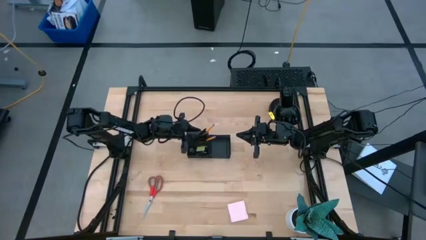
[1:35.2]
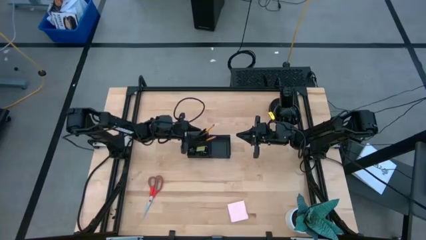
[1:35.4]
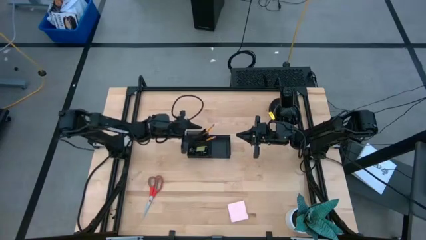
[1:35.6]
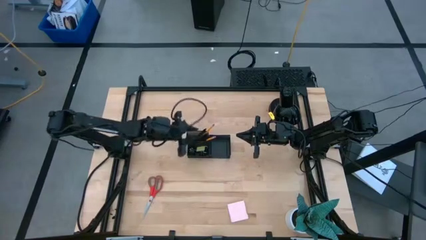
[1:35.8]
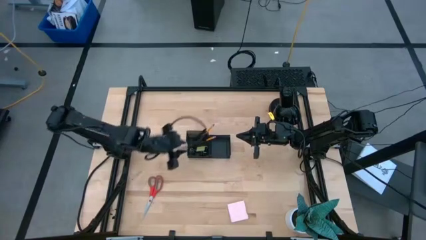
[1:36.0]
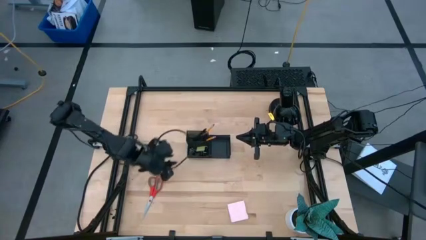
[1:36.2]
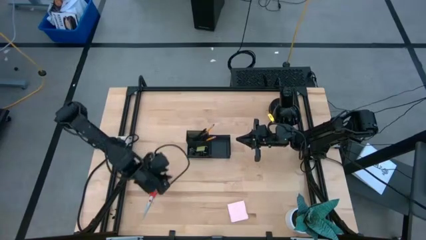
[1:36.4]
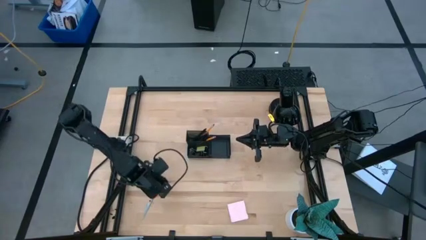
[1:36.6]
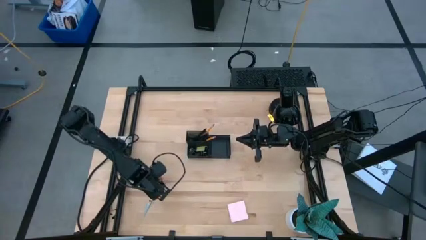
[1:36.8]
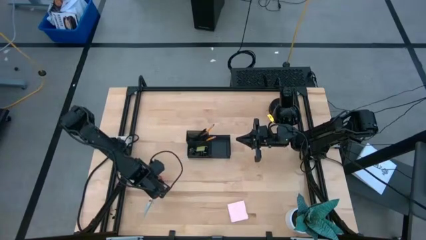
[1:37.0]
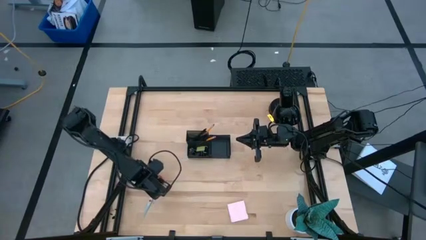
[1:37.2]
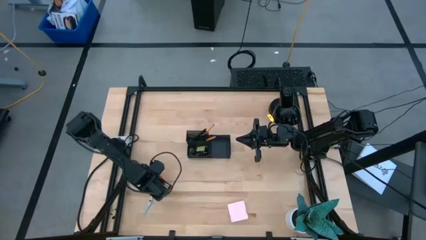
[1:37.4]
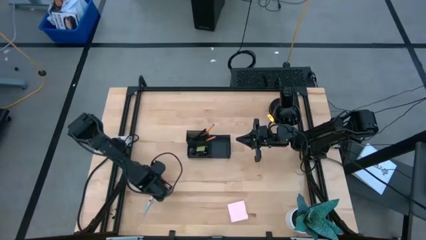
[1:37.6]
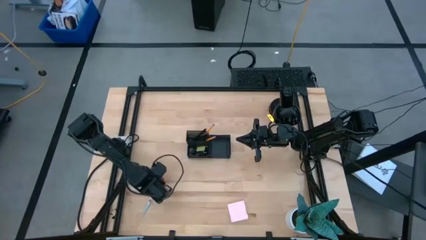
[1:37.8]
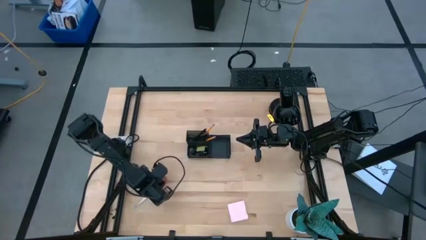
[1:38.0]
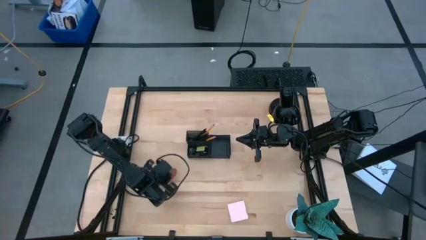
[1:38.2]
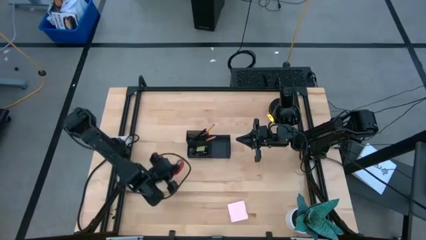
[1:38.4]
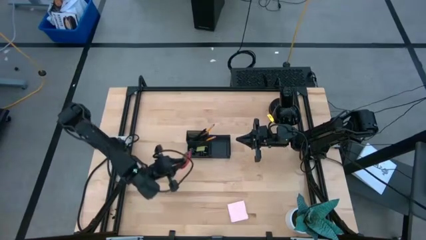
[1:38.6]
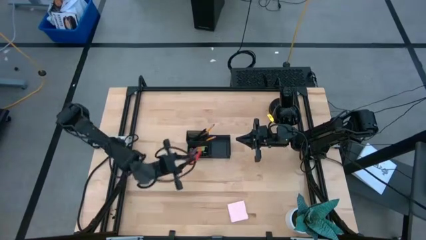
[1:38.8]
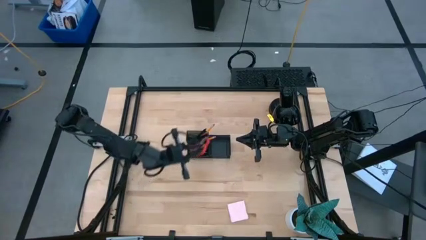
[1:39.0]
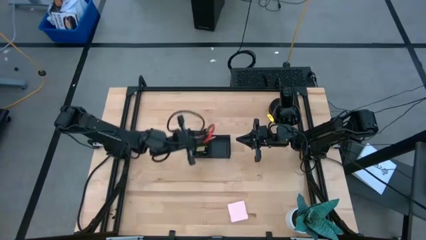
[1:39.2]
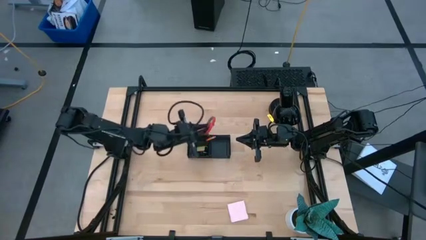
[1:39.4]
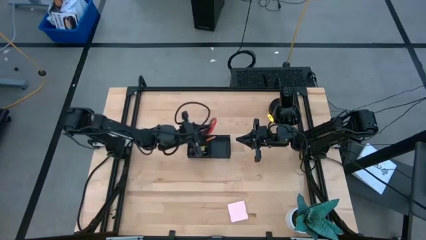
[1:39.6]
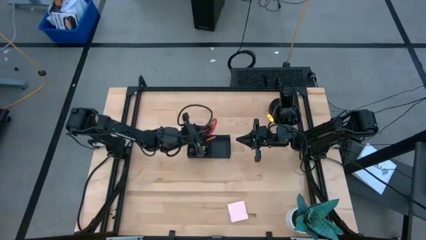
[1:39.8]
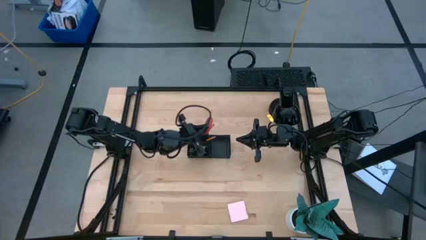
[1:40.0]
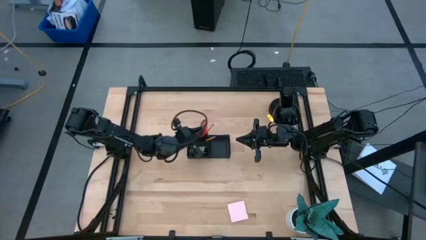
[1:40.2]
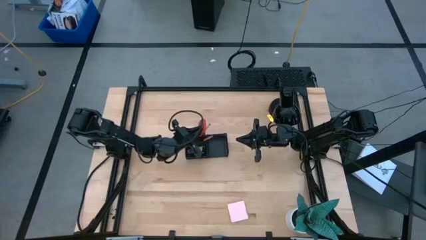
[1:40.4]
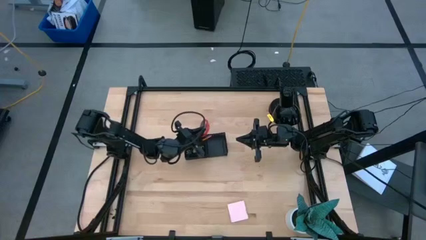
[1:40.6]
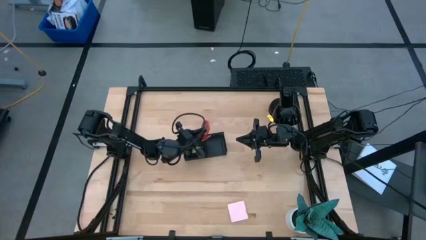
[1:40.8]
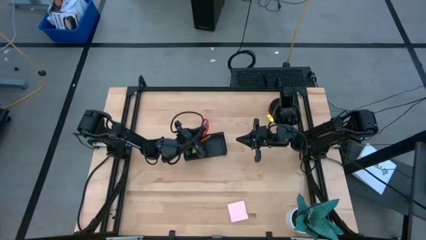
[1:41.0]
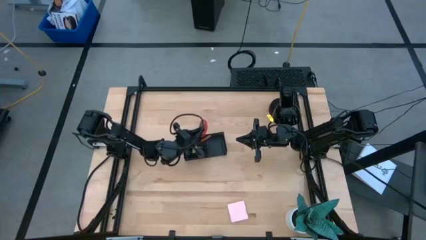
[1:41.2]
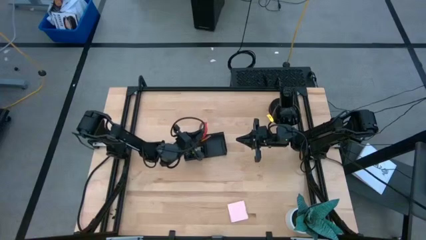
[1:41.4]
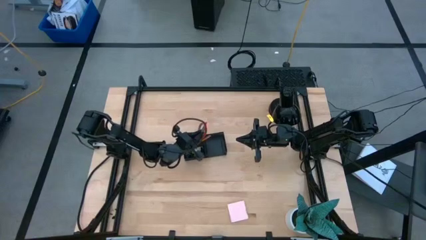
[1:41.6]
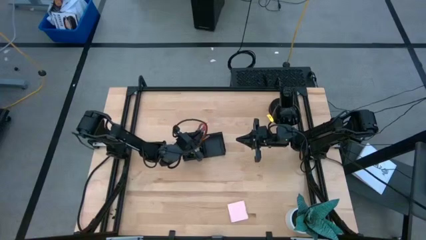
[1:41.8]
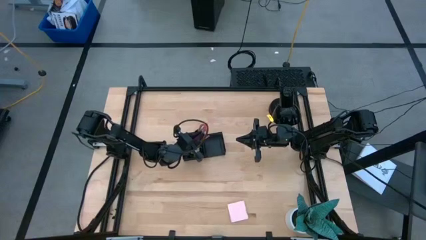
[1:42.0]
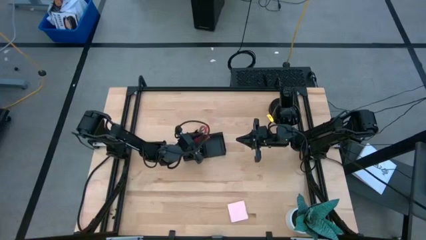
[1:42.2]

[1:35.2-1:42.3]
Task: Pick and place office supplies into organizer
Put the red scissors into the black desk organizer

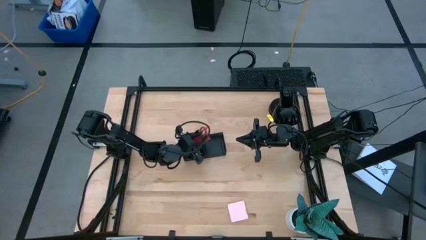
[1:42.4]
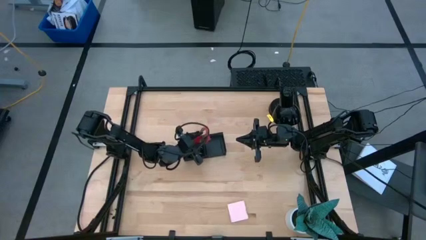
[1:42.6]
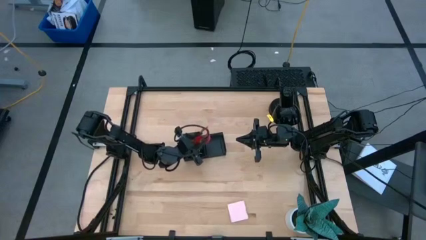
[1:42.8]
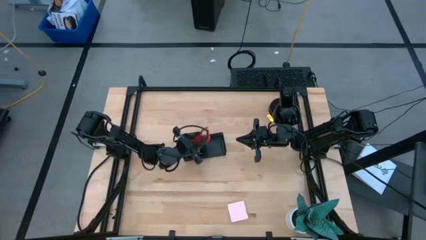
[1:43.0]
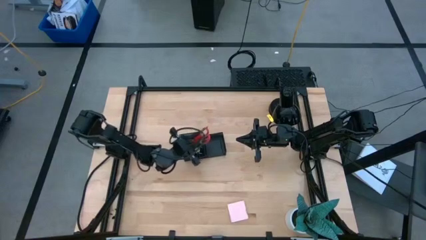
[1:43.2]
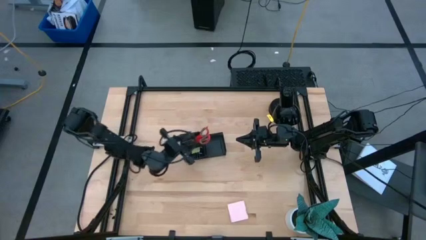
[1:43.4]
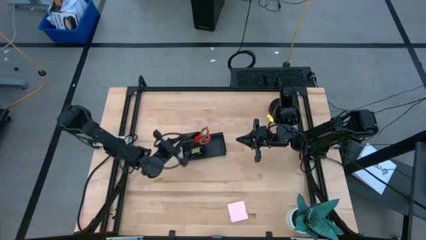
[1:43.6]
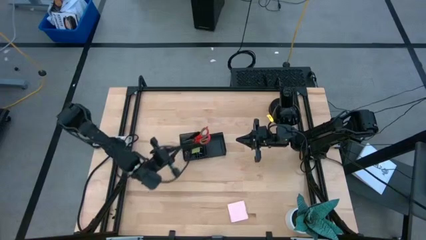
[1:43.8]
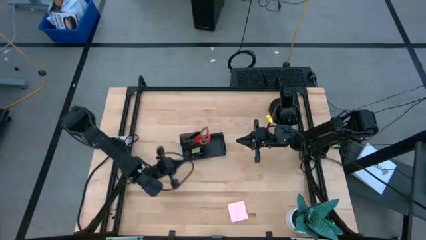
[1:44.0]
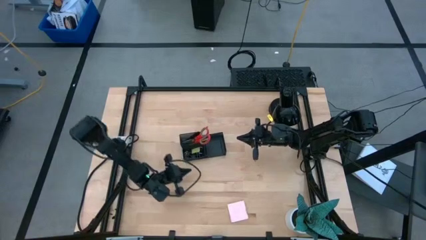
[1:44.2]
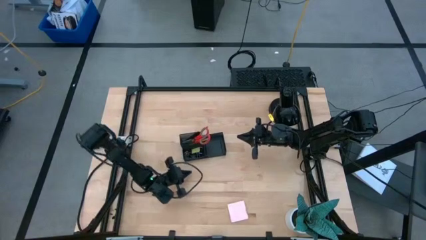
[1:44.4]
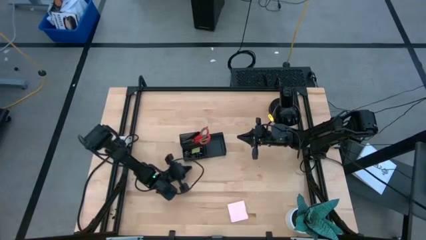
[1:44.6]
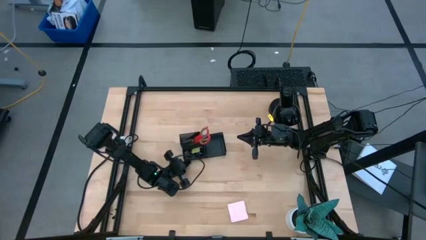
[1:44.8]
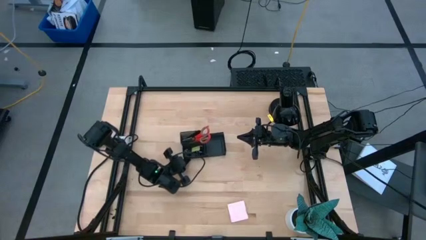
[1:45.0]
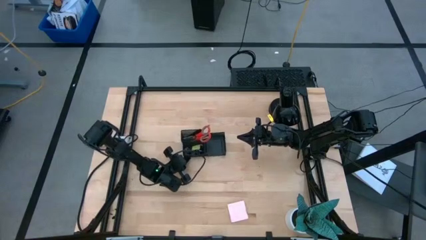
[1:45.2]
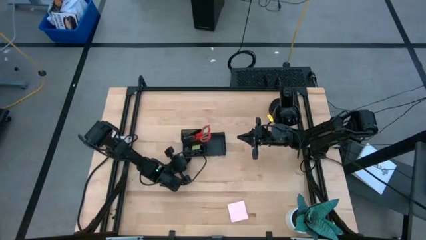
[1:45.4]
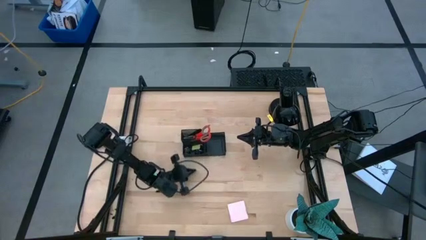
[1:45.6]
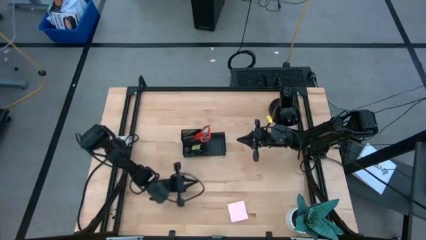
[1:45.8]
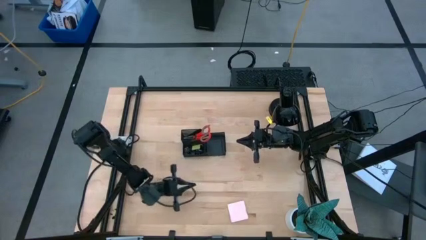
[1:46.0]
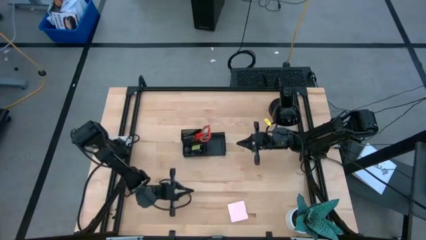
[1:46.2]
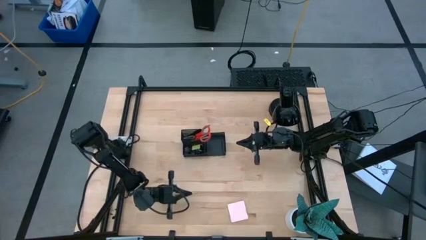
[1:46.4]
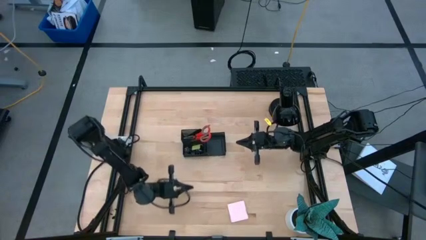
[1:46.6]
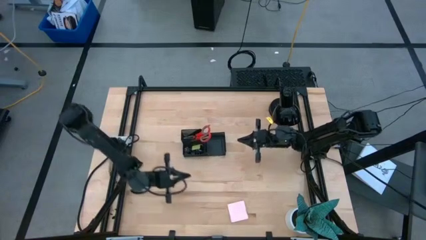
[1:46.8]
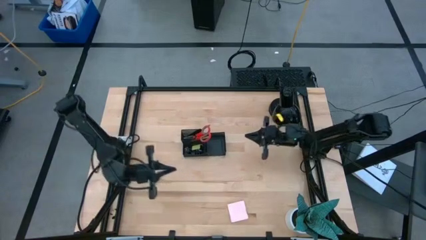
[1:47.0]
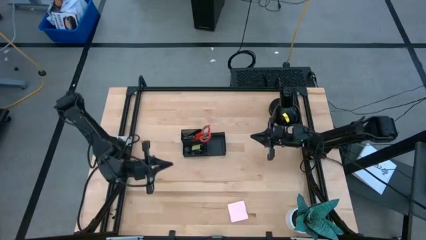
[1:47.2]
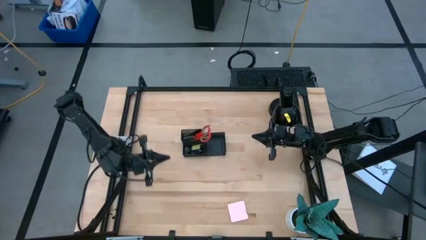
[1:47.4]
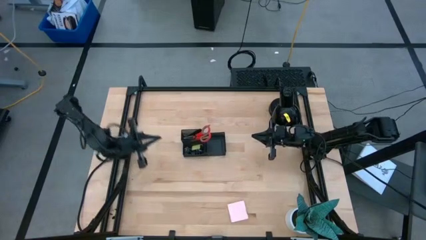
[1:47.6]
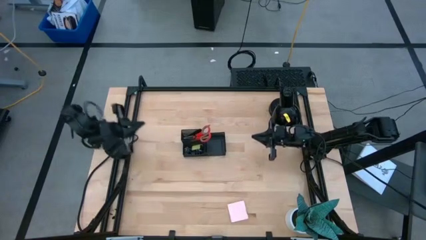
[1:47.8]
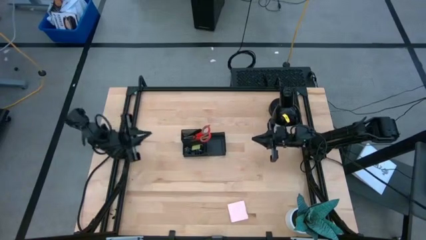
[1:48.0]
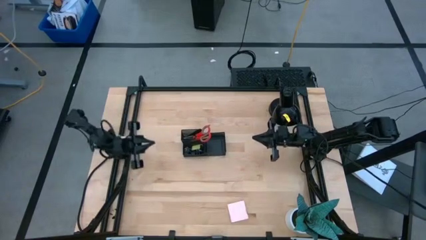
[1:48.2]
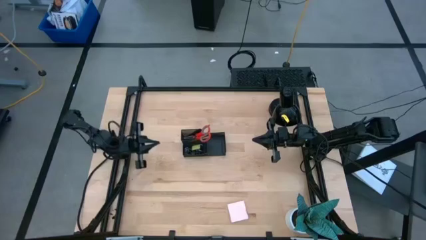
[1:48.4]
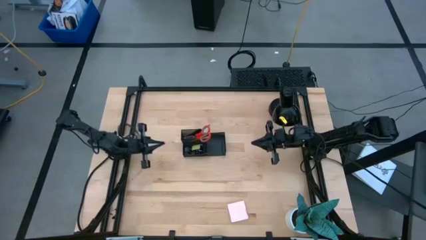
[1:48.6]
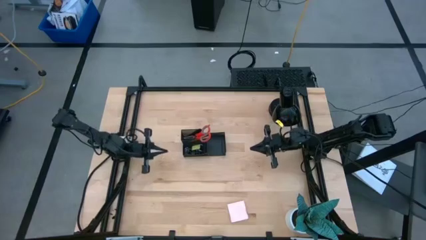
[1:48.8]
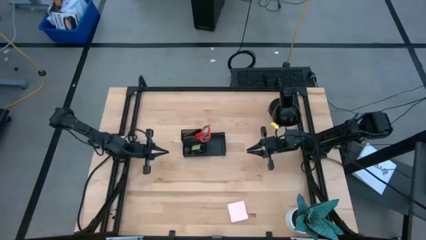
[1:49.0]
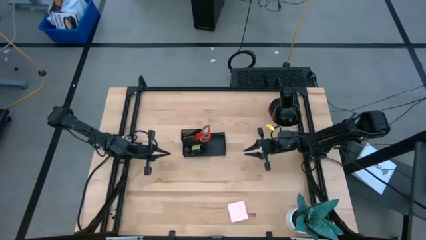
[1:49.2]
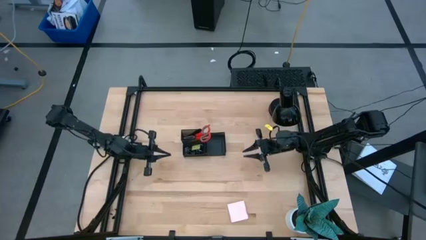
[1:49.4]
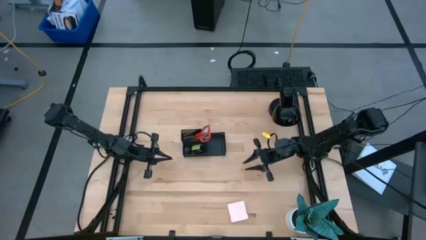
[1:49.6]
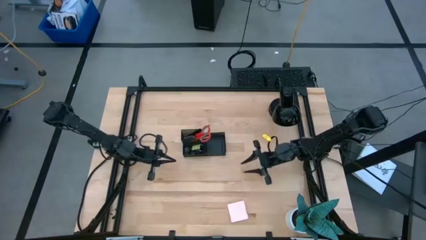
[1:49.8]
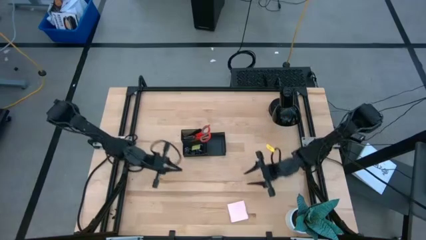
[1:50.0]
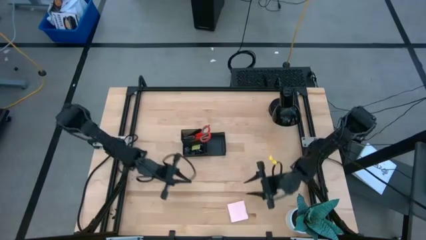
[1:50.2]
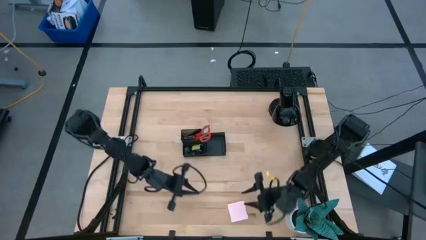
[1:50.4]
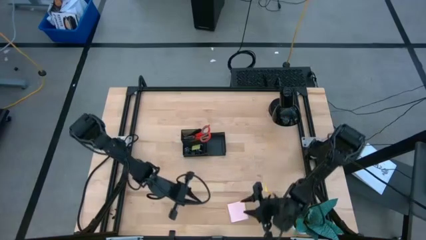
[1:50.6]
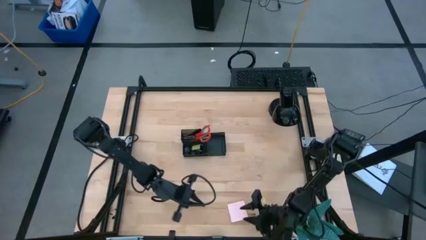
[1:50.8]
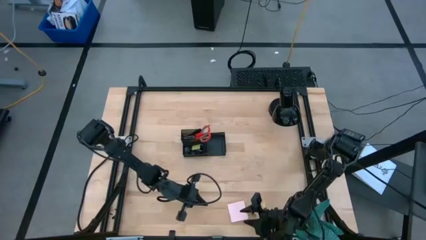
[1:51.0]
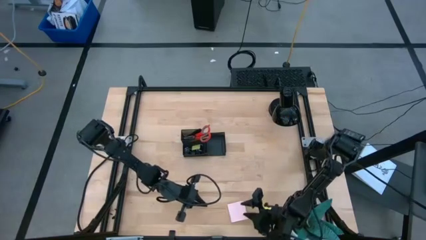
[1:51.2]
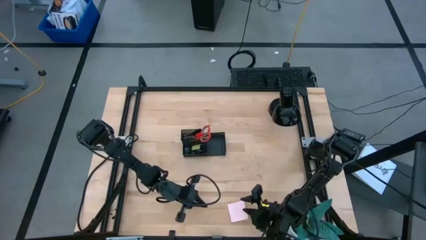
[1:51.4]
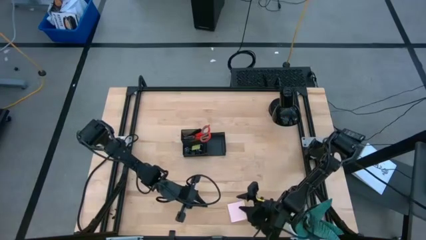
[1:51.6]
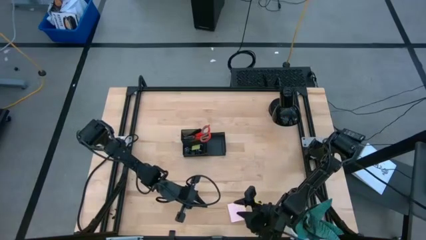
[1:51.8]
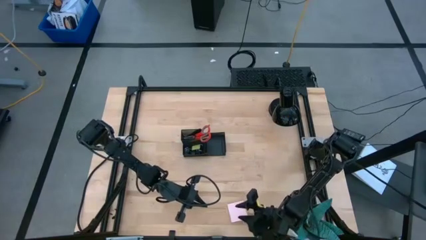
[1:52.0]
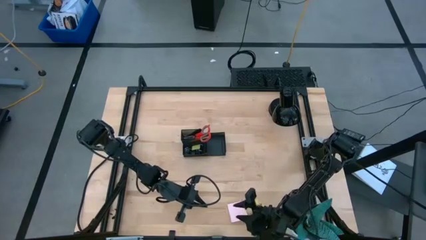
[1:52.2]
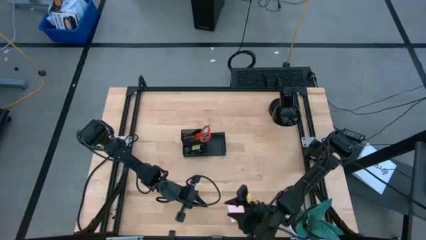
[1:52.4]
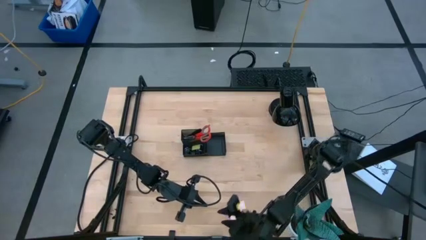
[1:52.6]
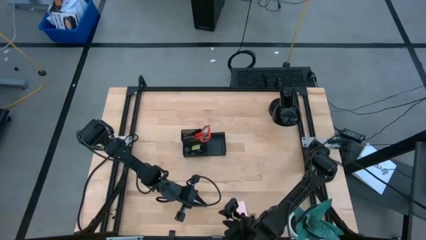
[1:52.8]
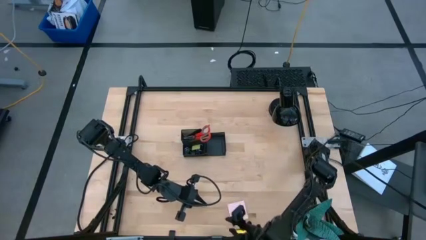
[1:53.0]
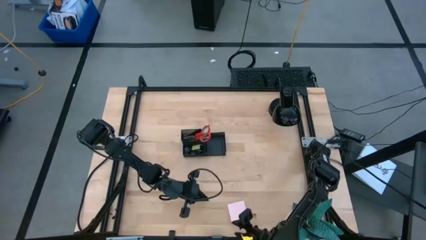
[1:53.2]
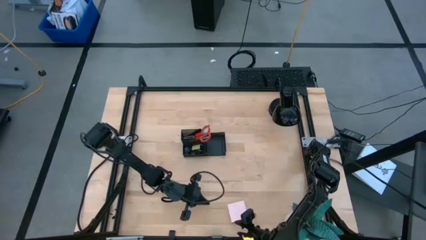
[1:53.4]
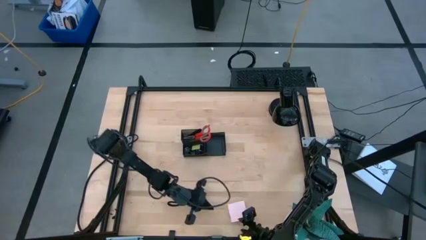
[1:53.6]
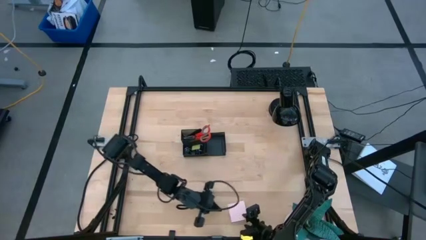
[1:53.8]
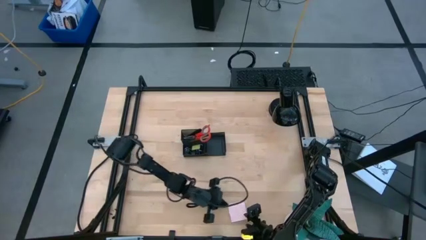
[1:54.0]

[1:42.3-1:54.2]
Put the pink sticky notes into the black desk organizer
